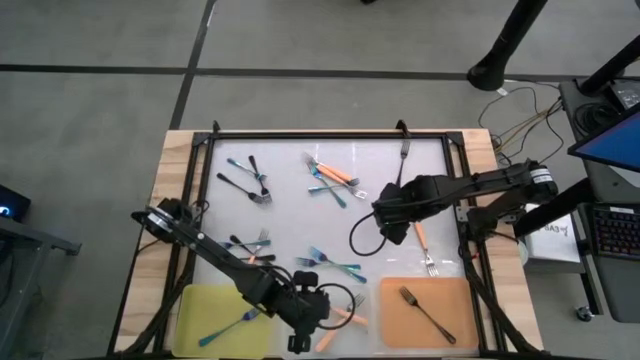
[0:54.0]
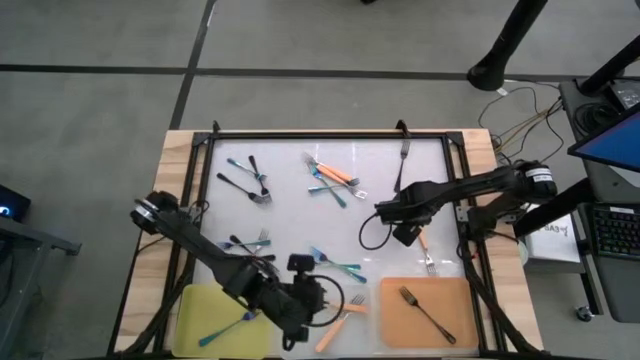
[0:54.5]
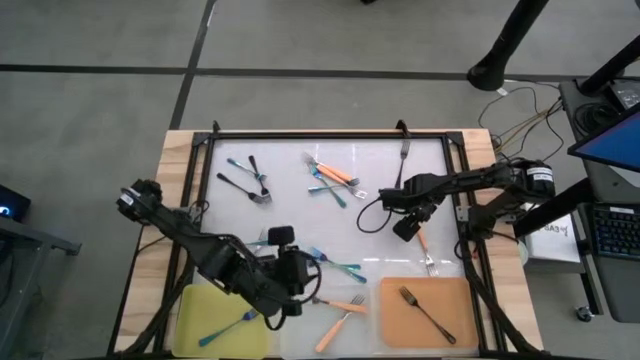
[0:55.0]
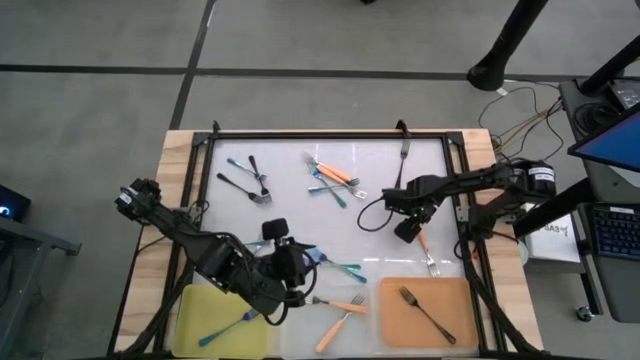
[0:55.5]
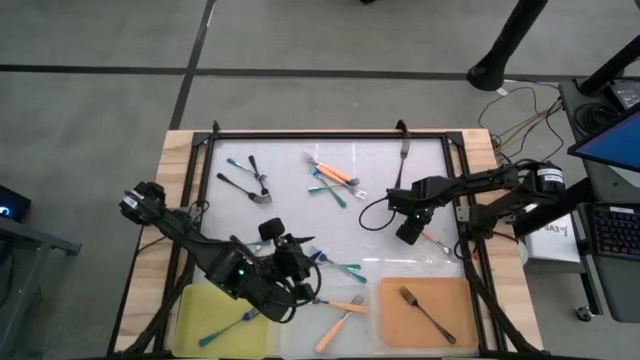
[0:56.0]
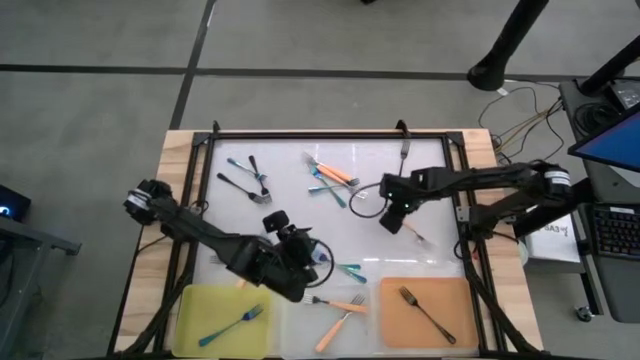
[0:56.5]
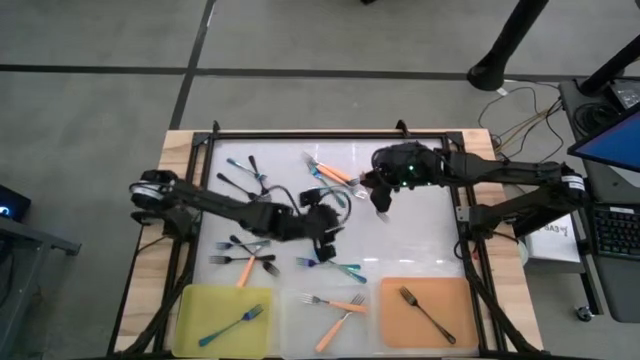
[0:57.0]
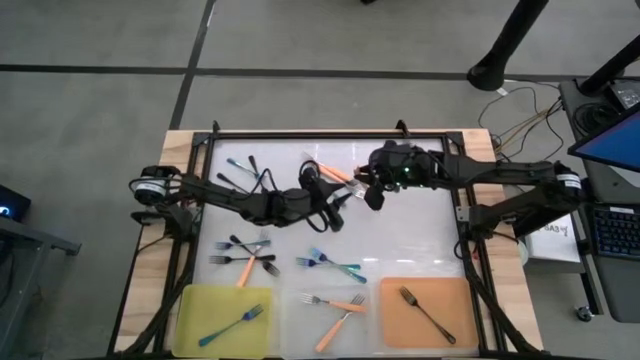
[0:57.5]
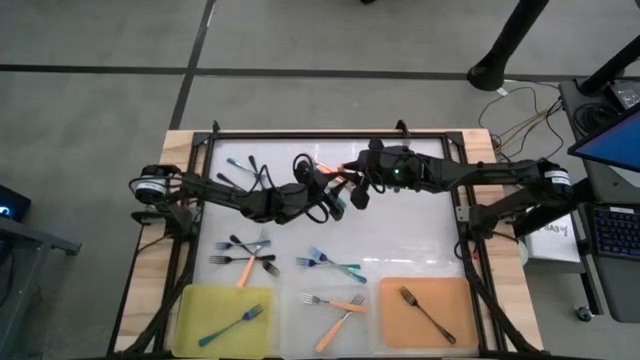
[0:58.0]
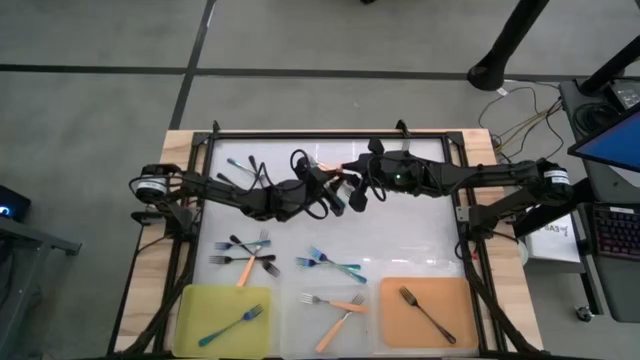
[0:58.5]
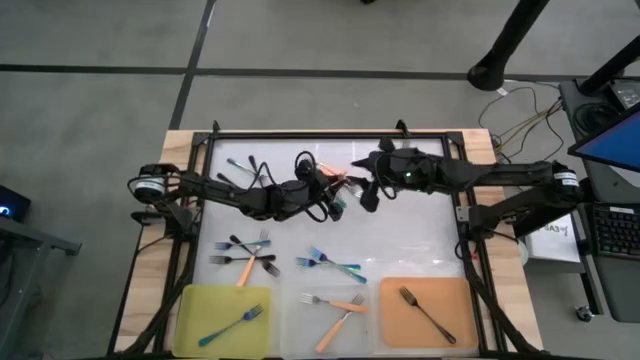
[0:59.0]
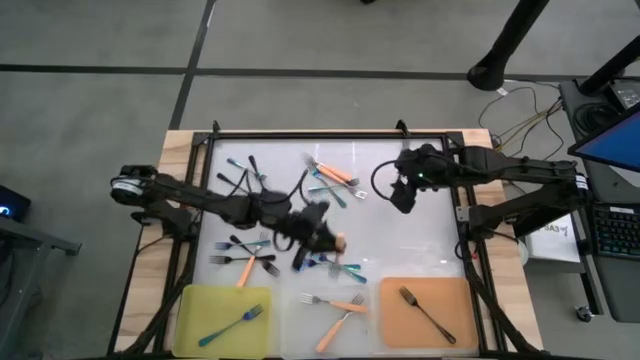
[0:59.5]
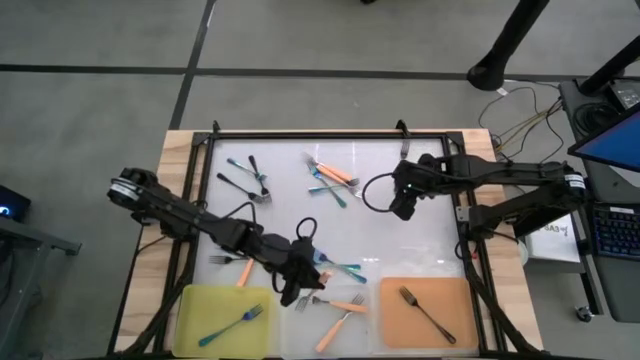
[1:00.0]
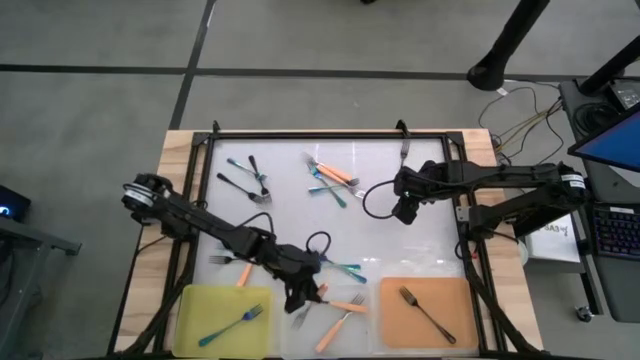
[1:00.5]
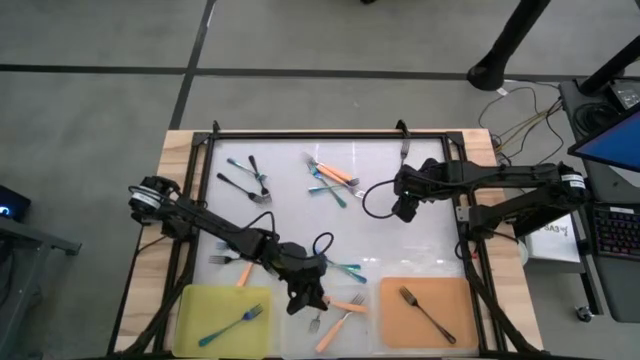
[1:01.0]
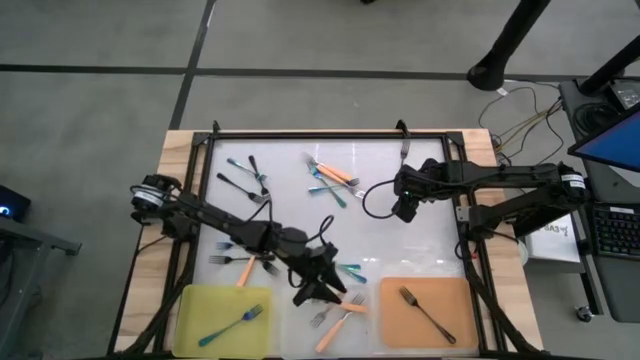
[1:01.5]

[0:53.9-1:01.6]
Task: Sort silverware by color (type)
Put the orange fork into the transparent bin

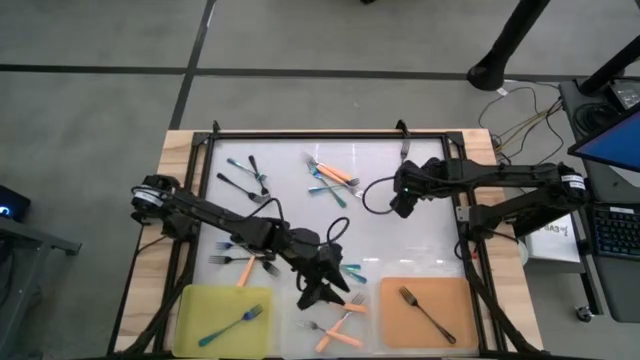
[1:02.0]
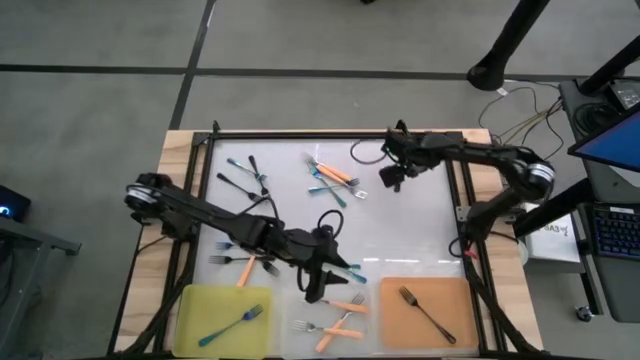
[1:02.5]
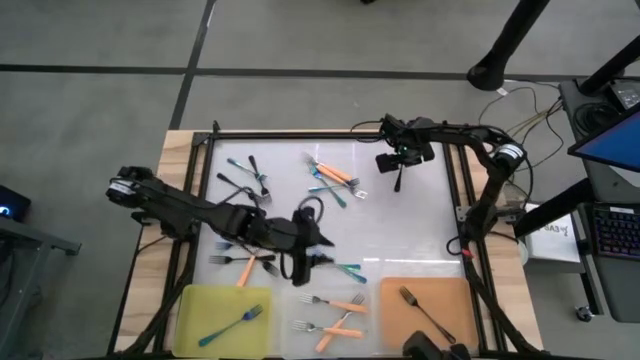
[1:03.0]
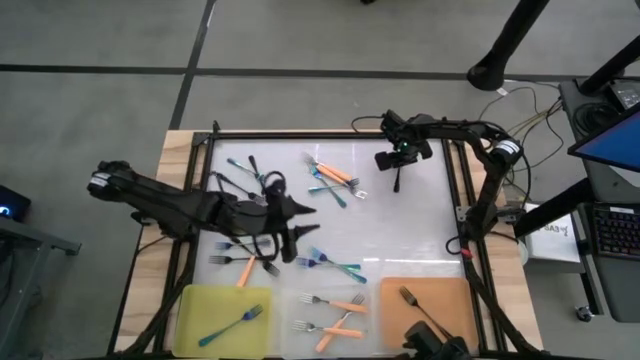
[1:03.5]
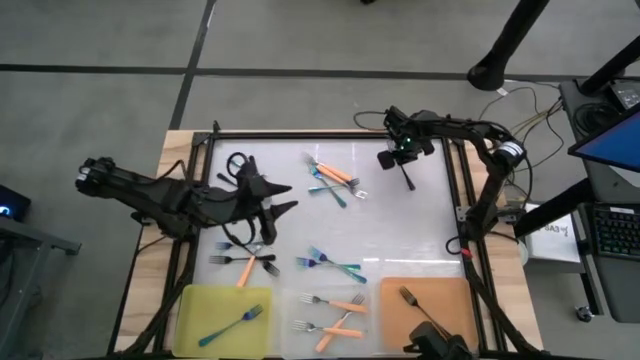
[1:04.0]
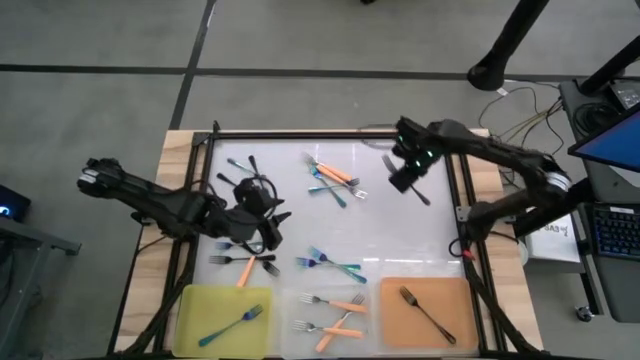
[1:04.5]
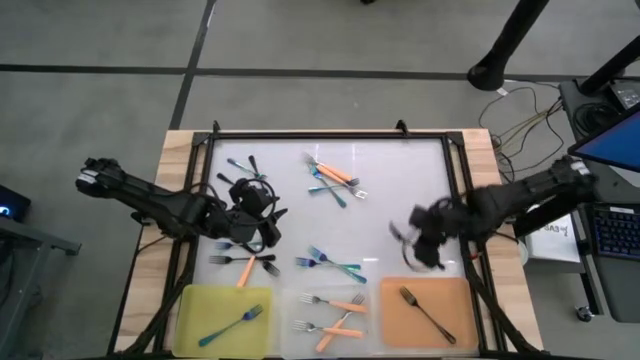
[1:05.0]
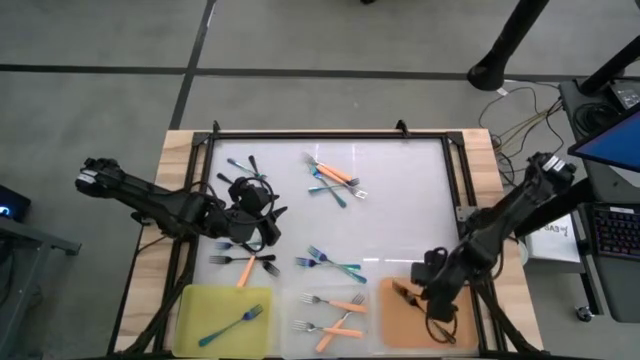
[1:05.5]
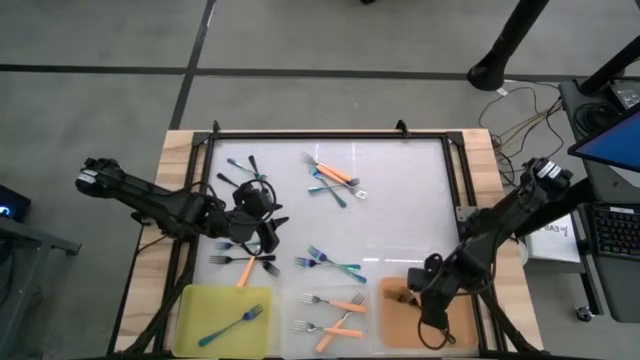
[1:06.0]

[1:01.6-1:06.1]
Put the black spoon into the orange bin

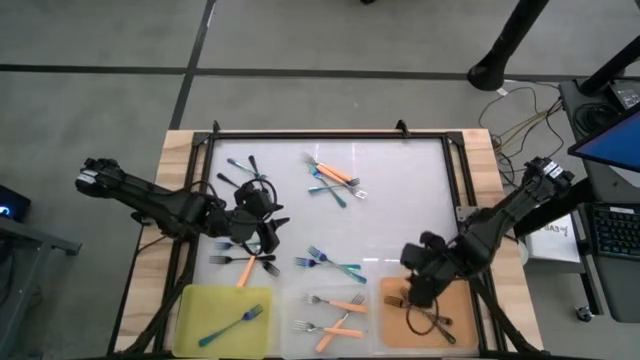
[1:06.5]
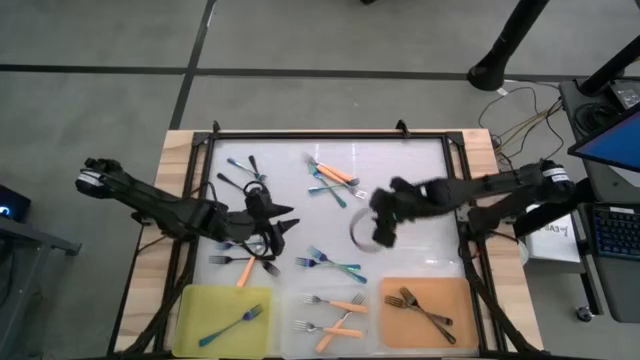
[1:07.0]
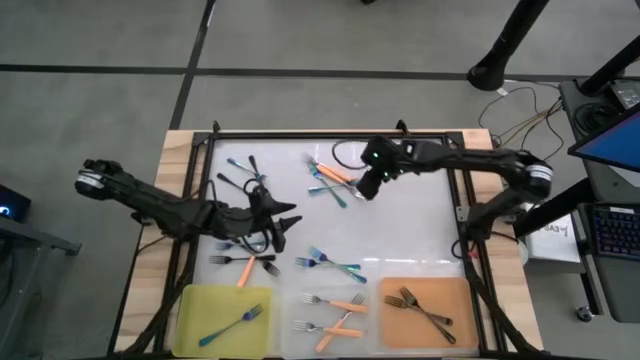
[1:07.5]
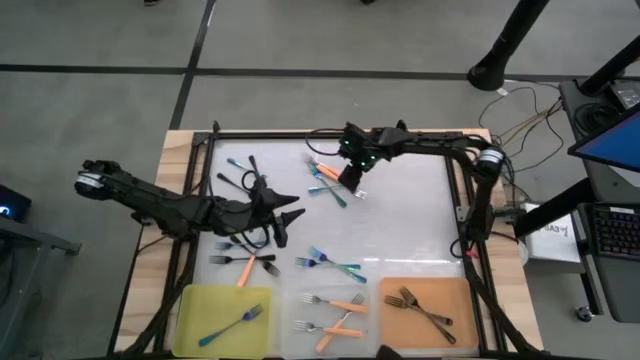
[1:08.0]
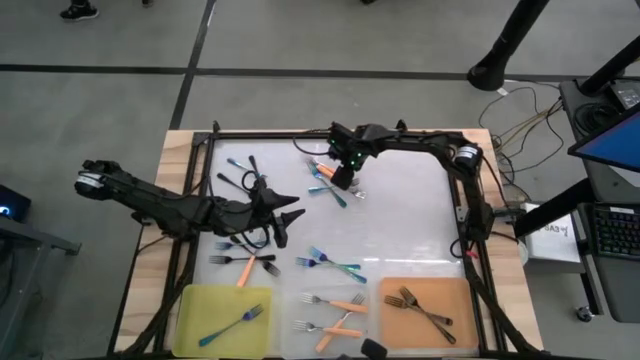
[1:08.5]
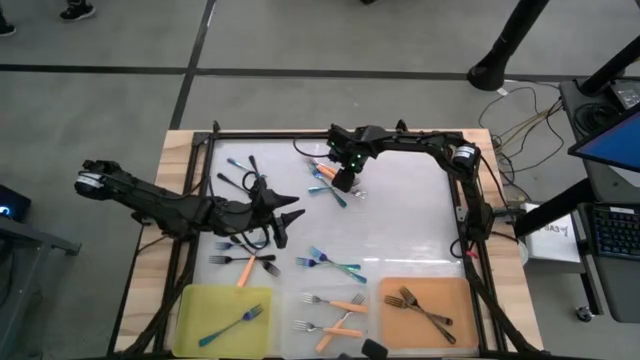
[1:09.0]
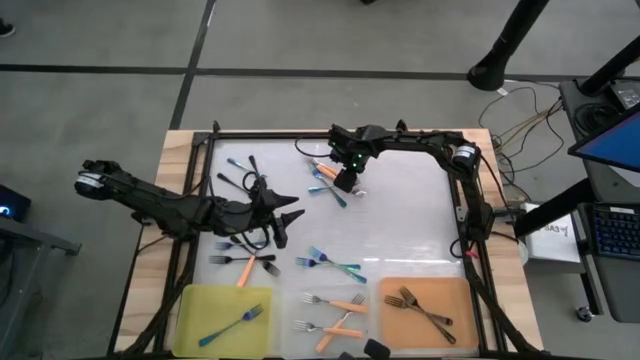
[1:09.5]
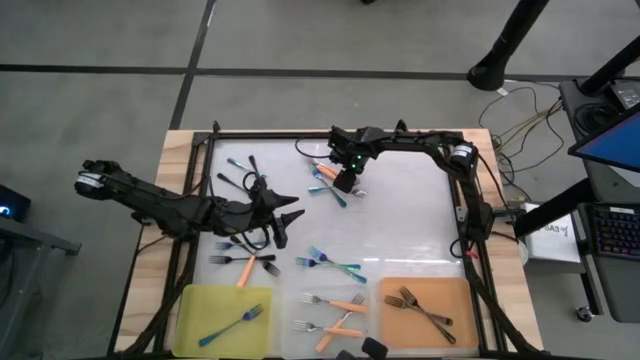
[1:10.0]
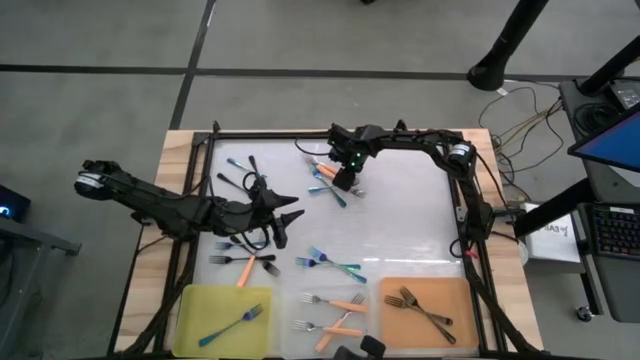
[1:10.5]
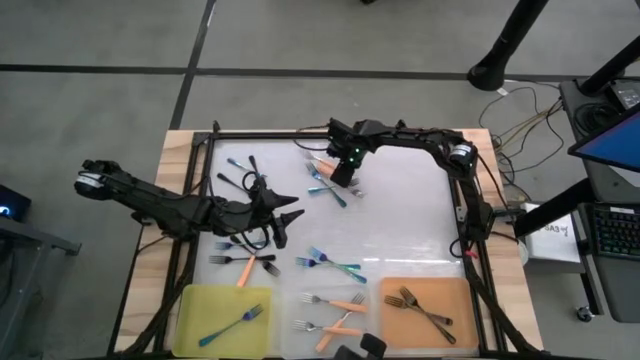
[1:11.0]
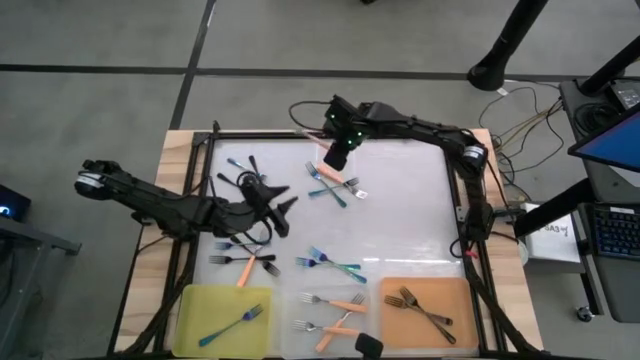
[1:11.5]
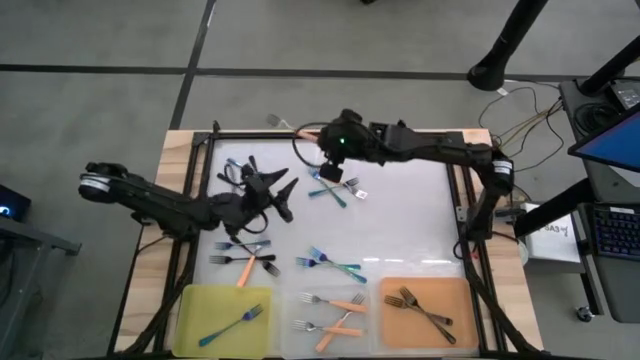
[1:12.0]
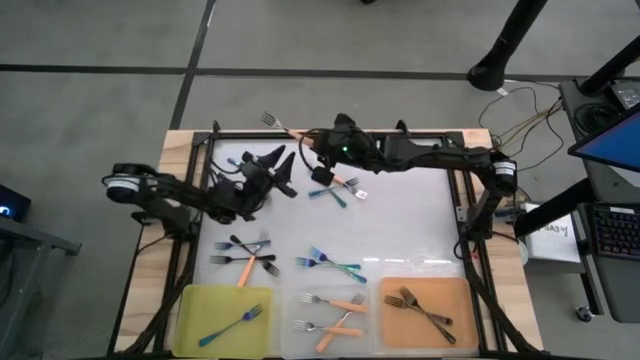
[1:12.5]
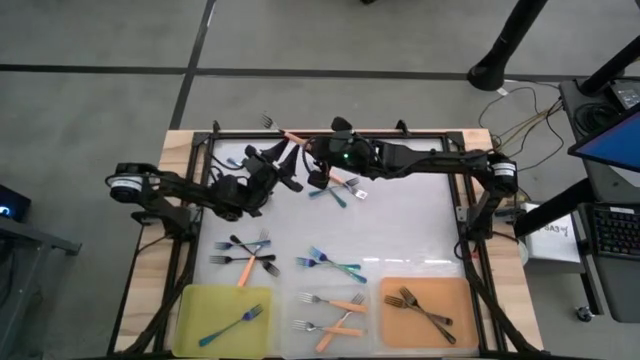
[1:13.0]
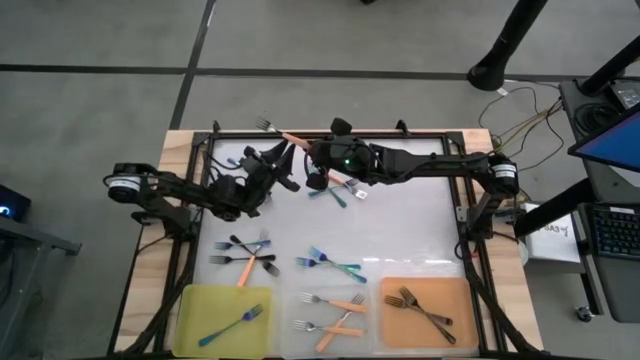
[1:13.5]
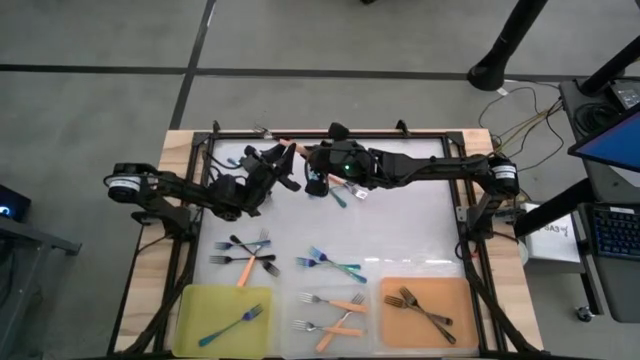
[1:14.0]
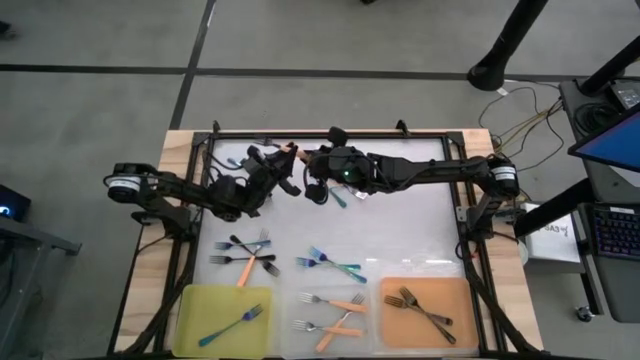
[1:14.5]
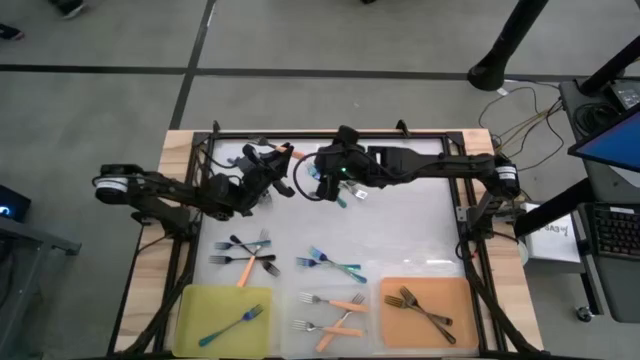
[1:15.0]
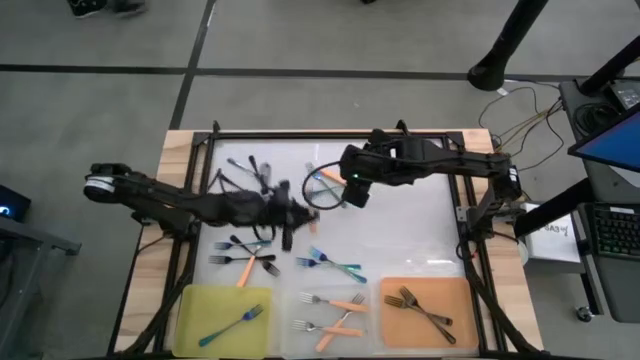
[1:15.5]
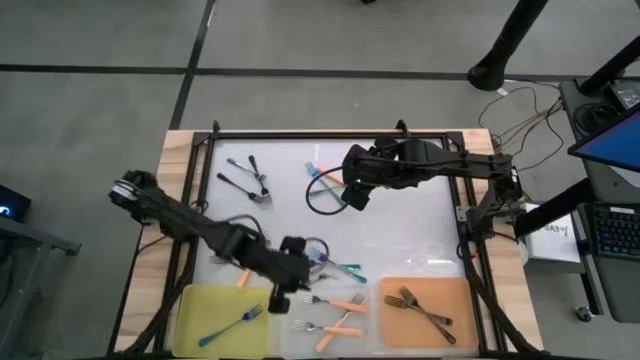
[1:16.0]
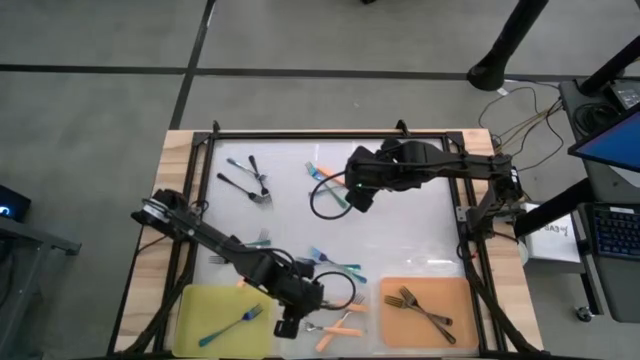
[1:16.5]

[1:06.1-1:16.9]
Put the orange fork into the transparent bin
